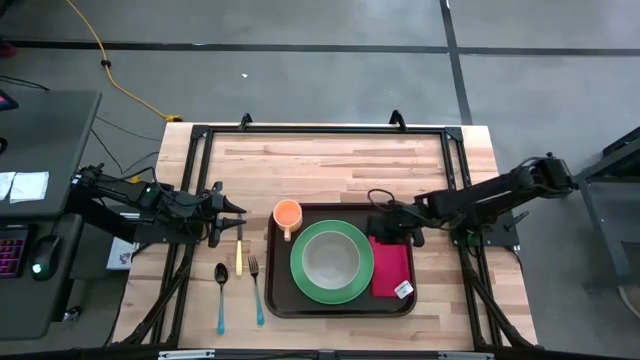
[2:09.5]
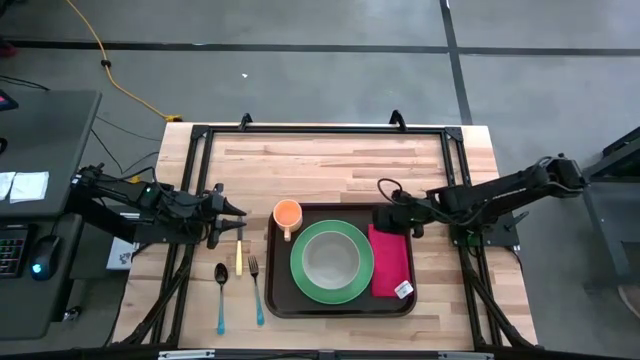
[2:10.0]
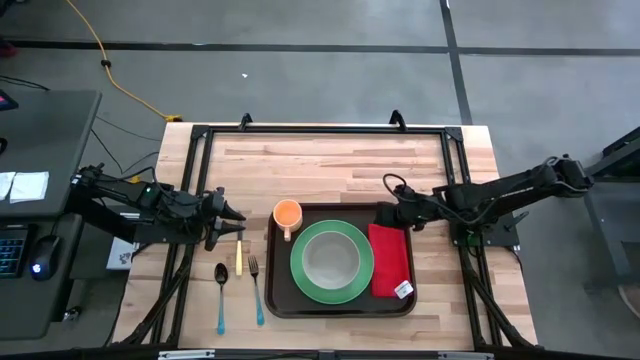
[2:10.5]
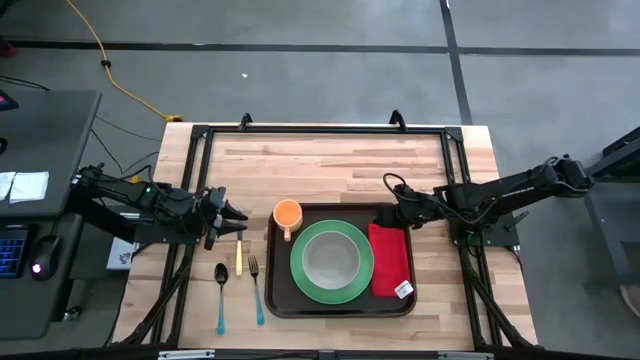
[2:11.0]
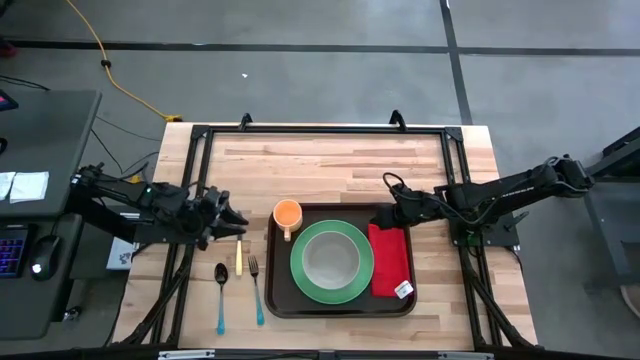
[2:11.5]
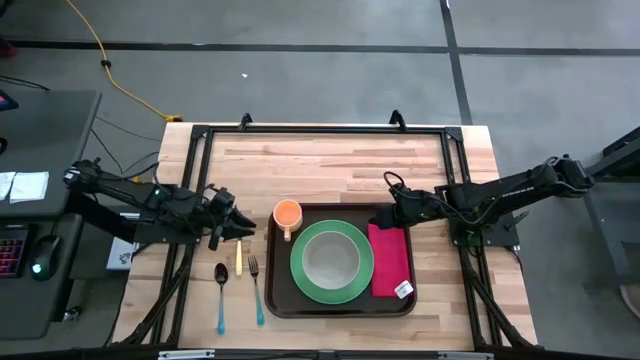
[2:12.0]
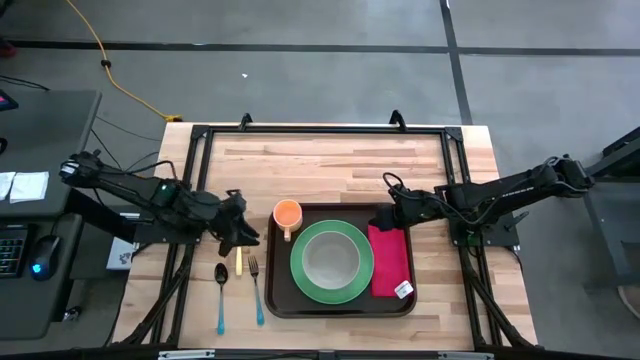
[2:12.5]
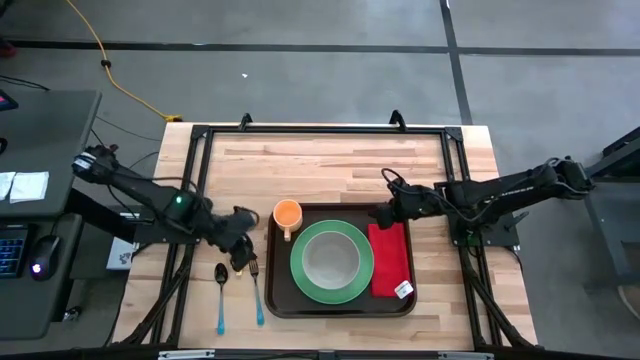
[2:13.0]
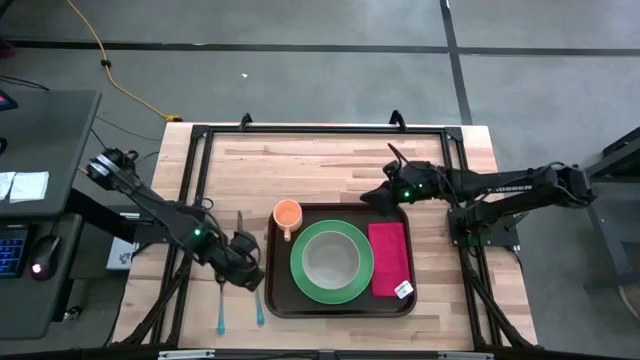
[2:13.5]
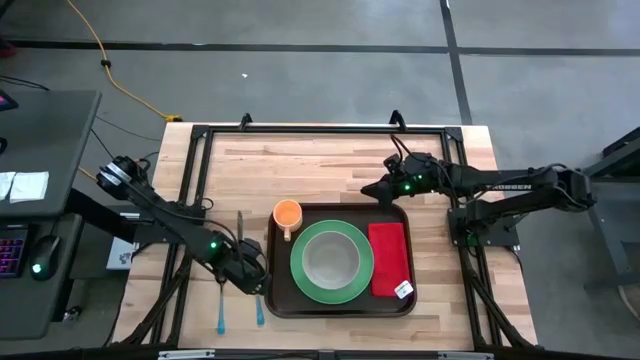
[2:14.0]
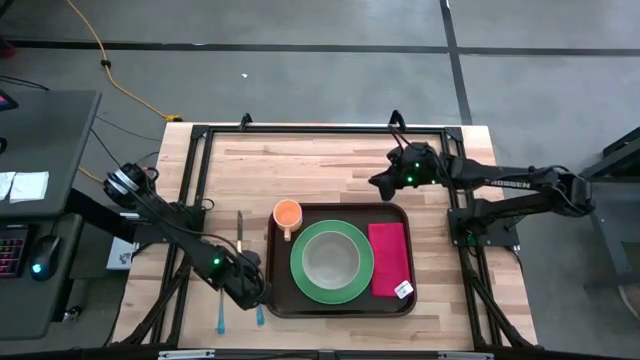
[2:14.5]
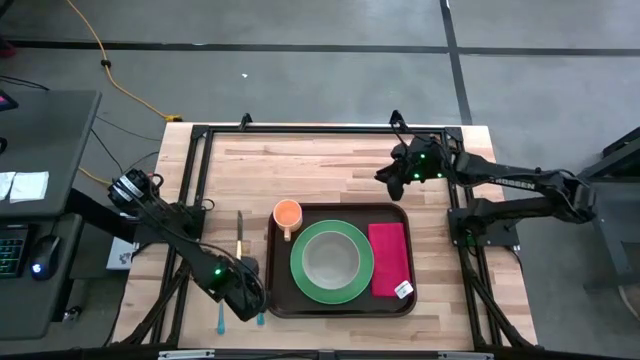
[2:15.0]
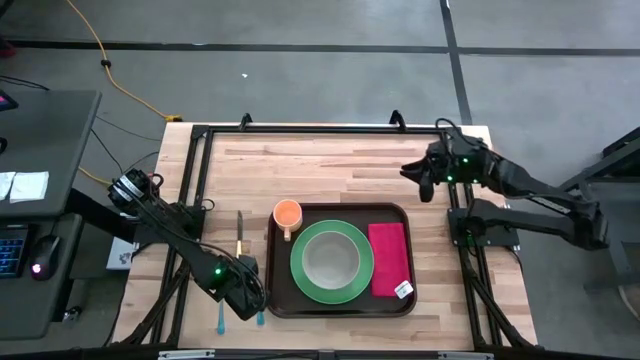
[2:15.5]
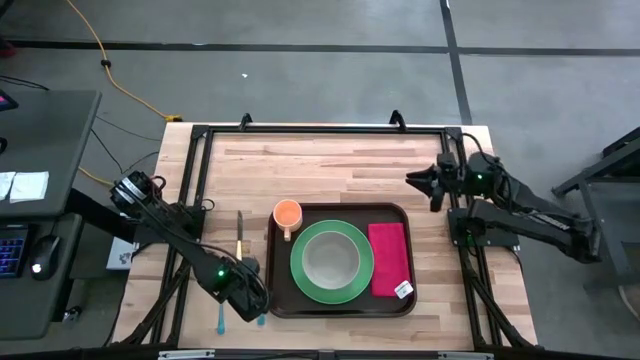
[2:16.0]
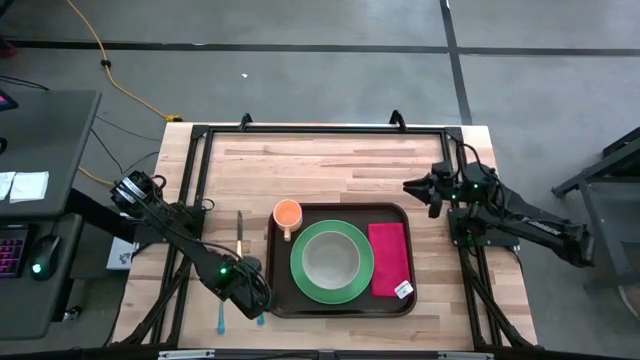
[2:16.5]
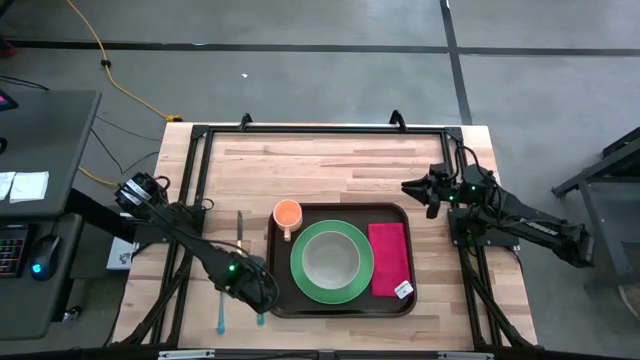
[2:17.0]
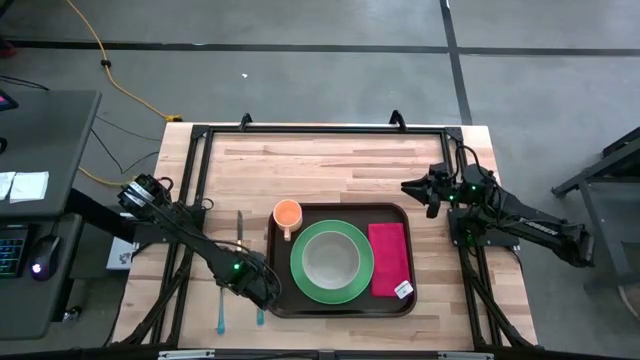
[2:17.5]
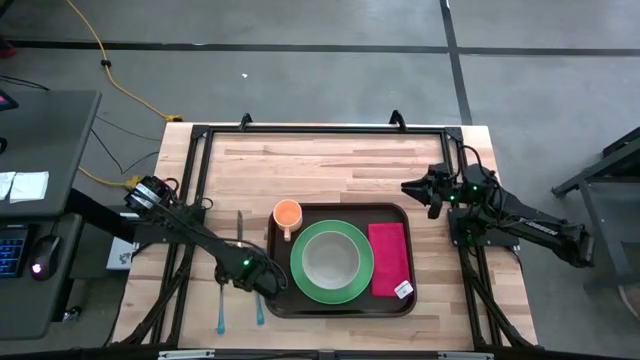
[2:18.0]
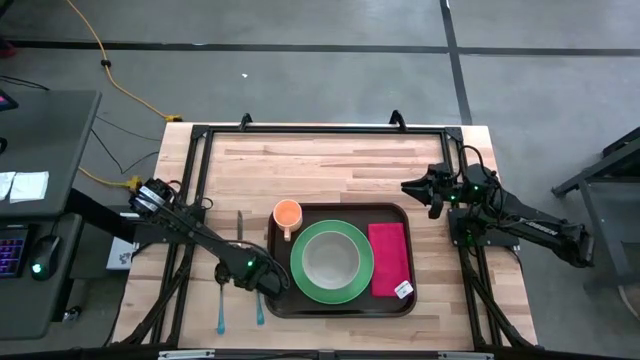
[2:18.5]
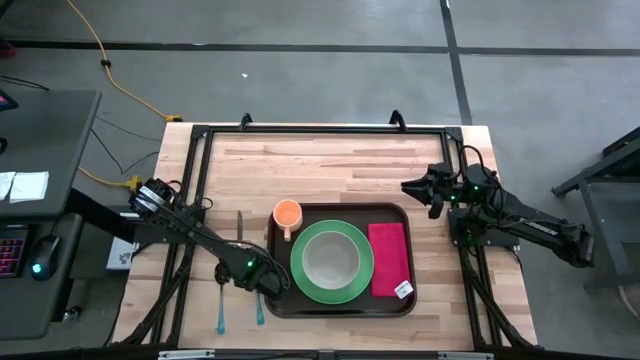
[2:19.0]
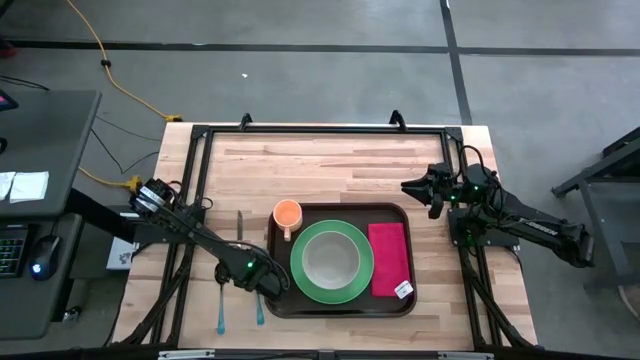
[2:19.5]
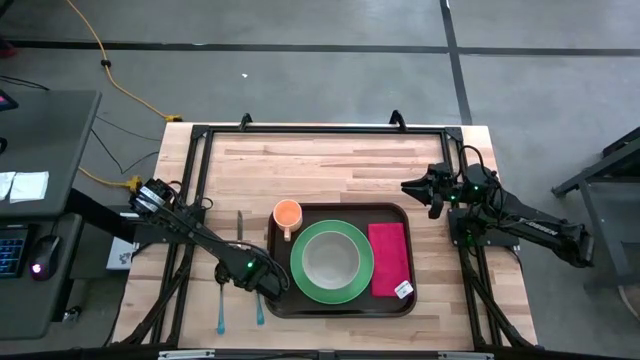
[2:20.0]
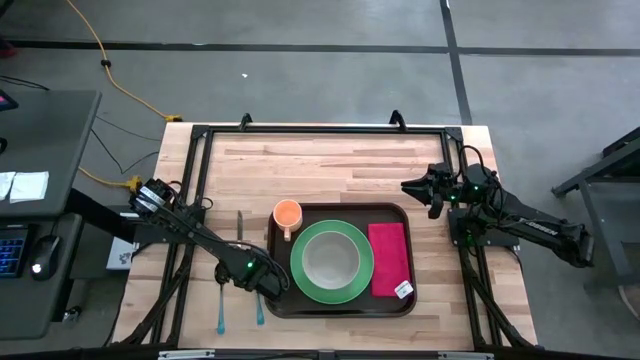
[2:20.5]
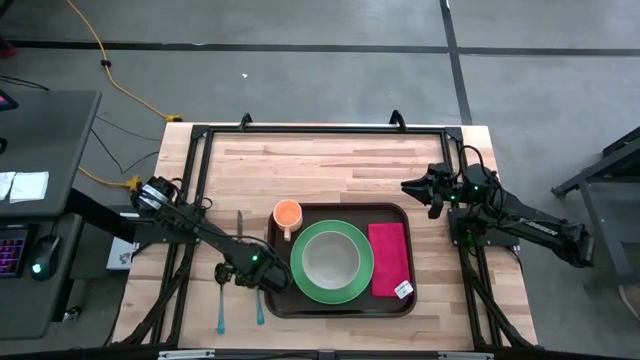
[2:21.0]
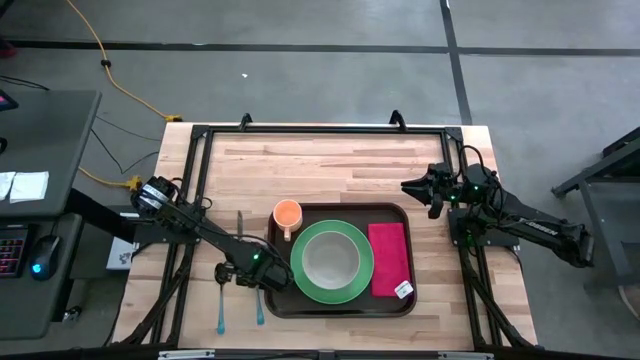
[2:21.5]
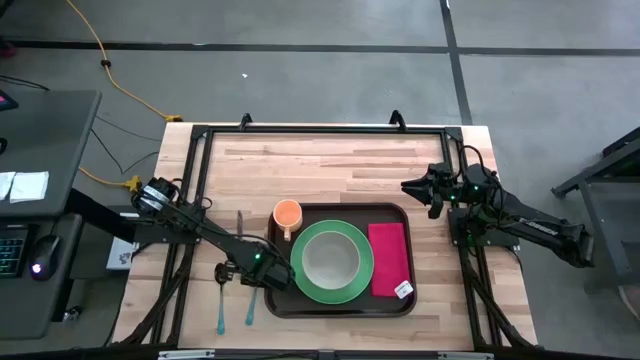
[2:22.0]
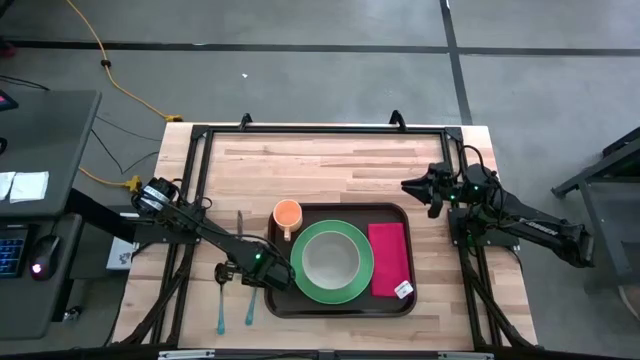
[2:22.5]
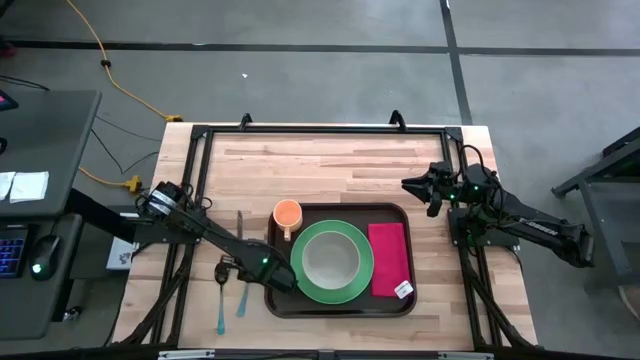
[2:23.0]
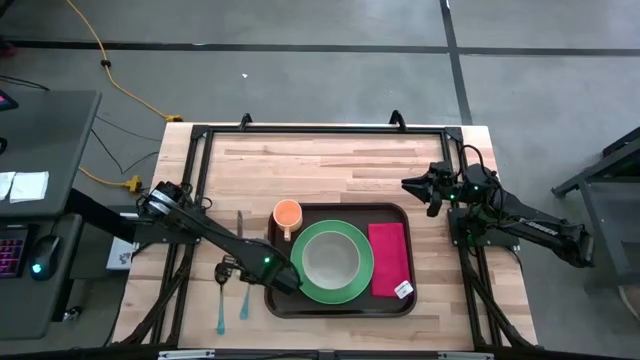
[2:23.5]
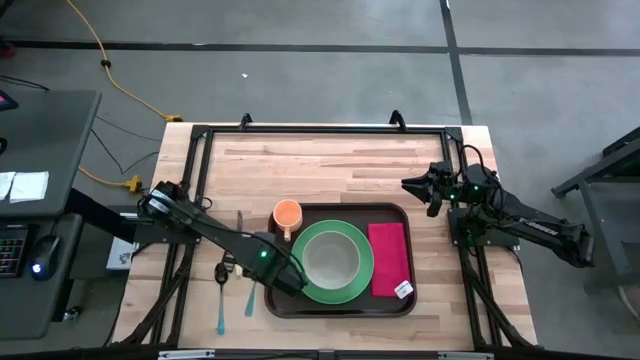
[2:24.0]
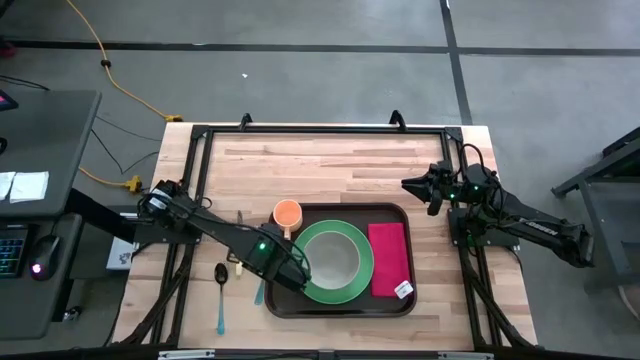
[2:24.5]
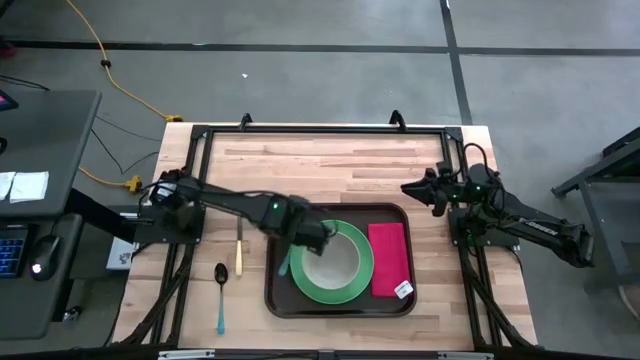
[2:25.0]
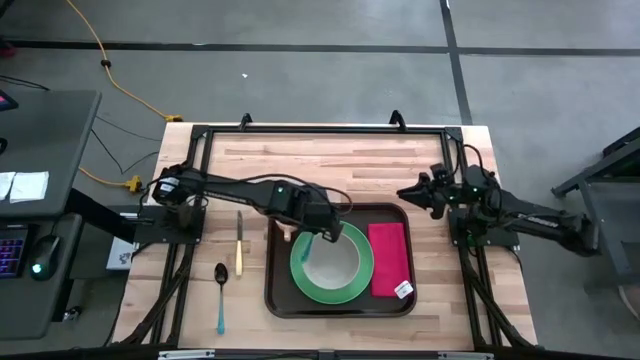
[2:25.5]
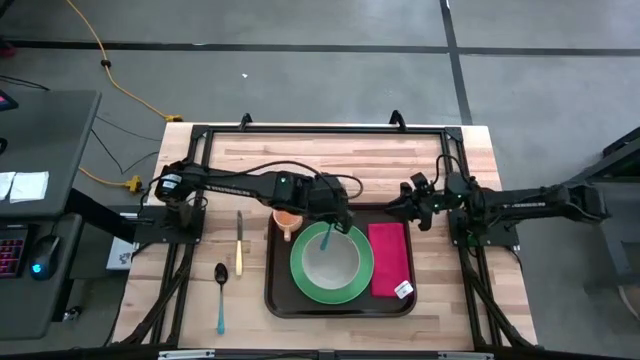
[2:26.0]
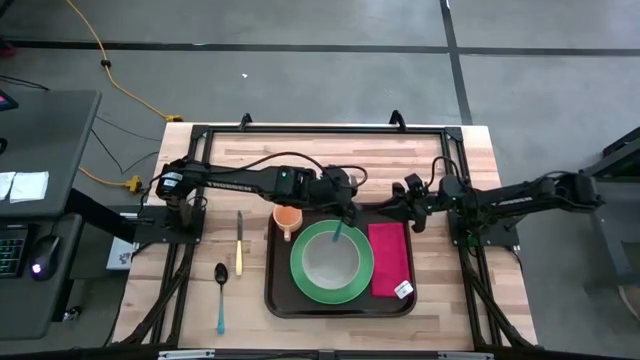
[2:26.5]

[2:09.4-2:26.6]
Task: Set up tray
Put the blue fork on top of the red napkin

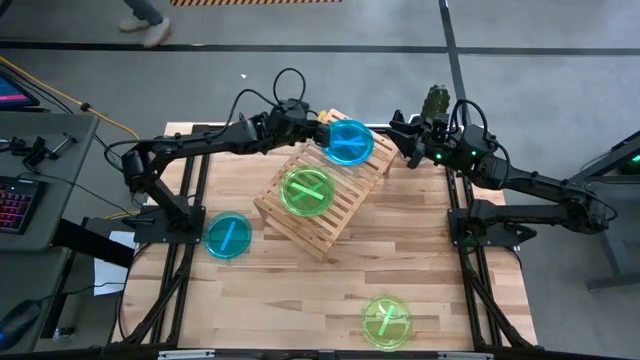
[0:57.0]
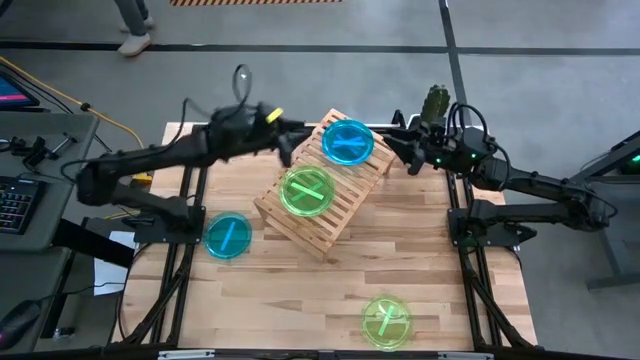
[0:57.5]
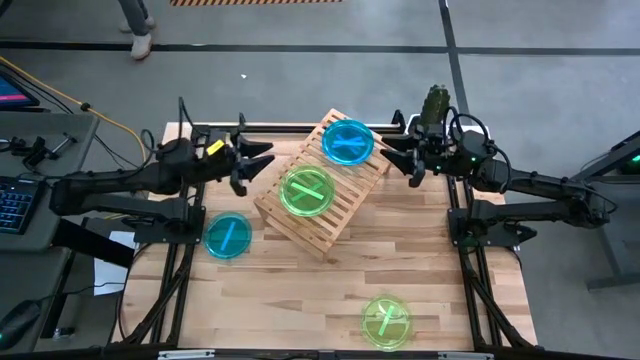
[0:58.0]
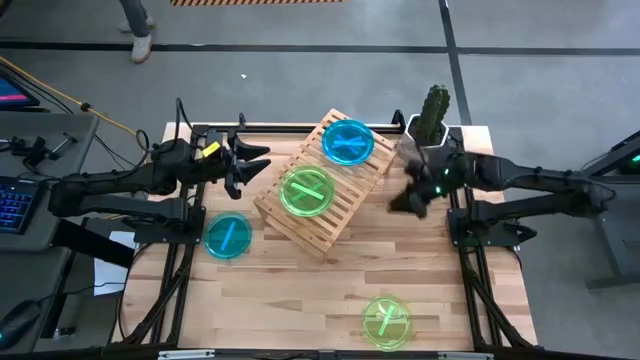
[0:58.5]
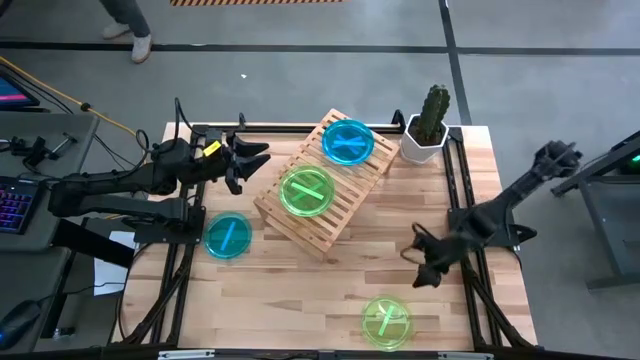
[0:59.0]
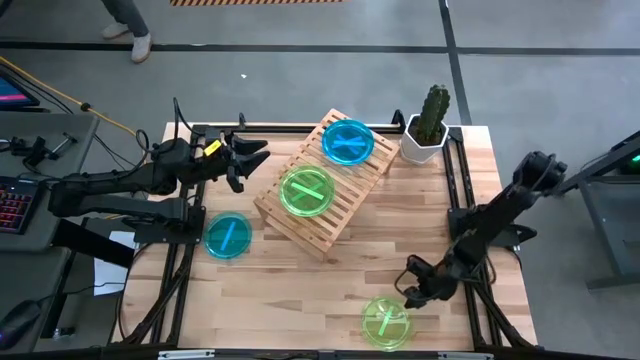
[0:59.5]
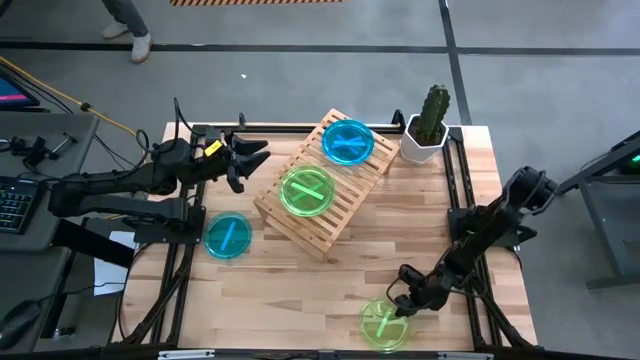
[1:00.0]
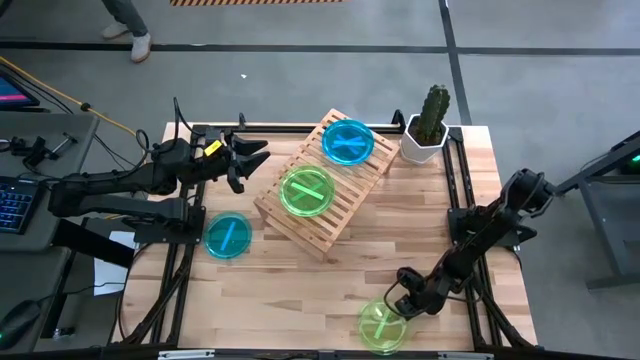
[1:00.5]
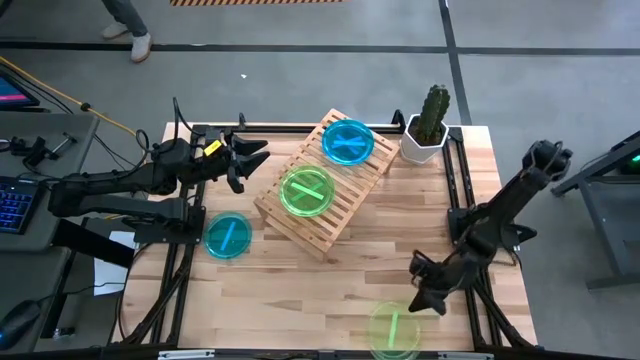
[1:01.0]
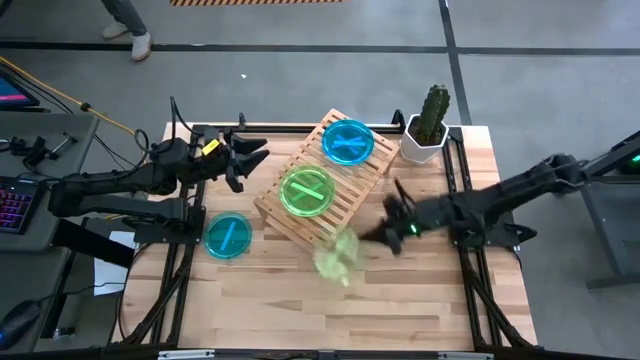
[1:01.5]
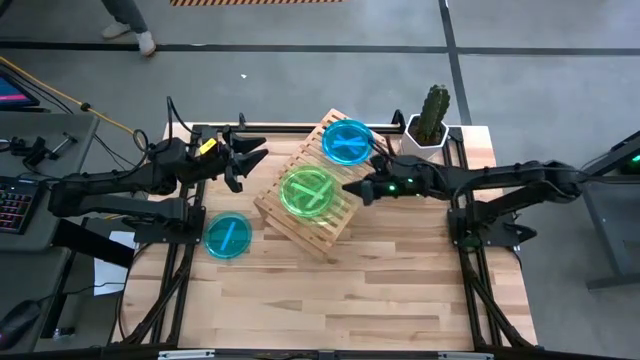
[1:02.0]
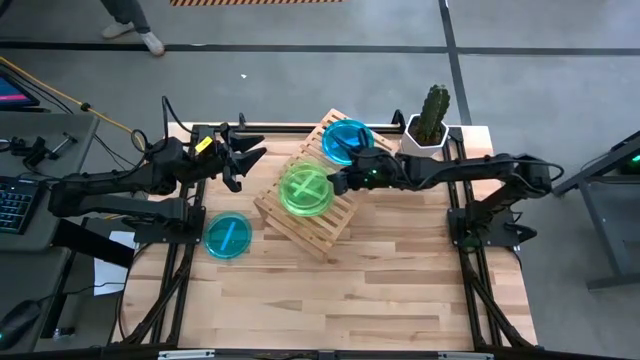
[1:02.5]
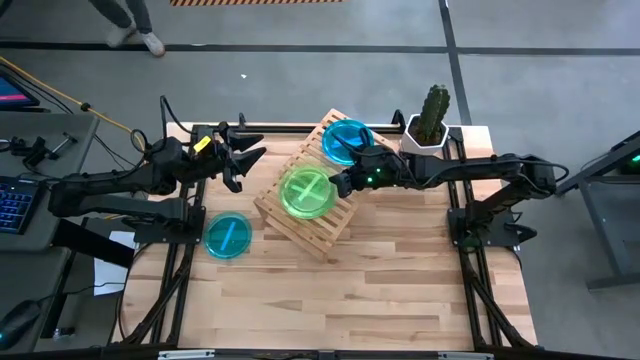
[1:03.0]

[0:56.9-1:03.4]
Task: Place and stack plates onto a shelf
Stack the green plate on top of the green plate on the shelf
